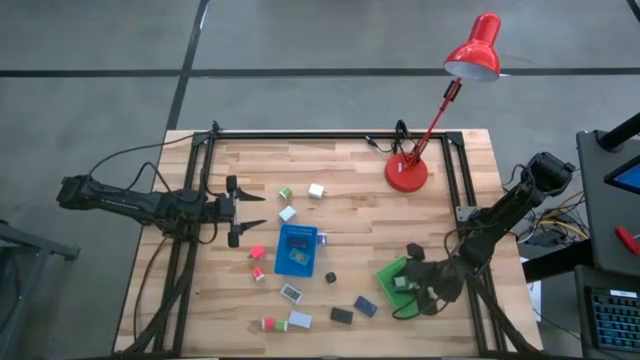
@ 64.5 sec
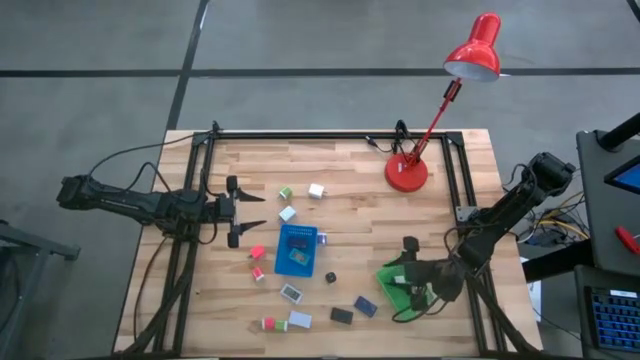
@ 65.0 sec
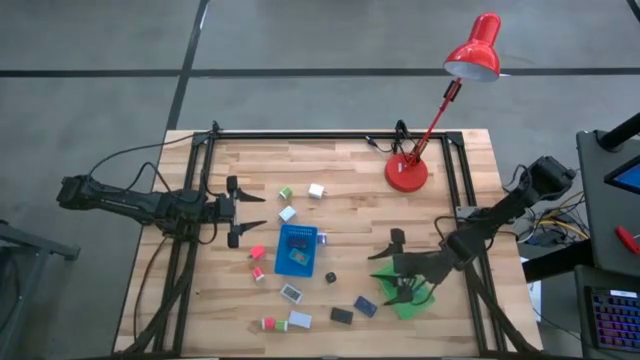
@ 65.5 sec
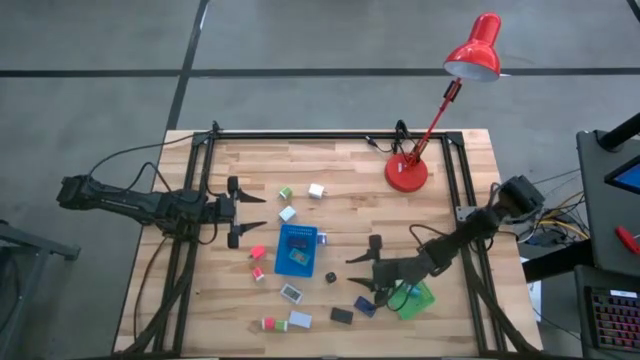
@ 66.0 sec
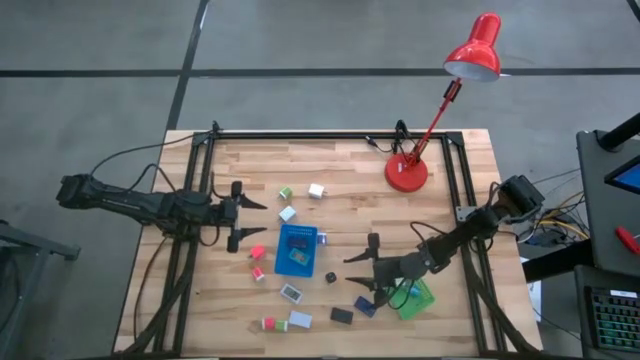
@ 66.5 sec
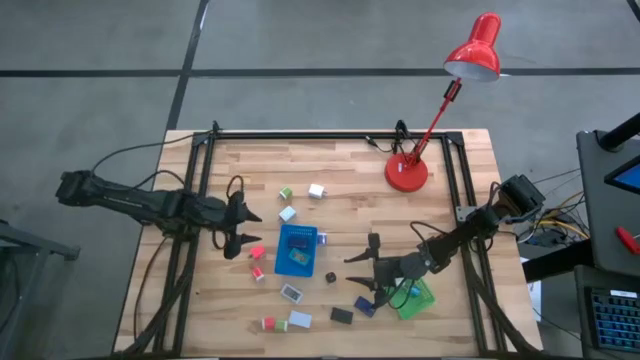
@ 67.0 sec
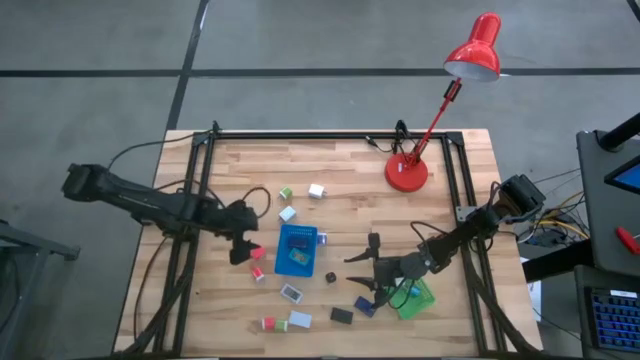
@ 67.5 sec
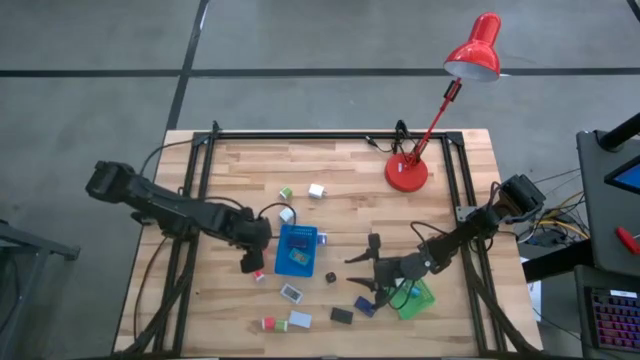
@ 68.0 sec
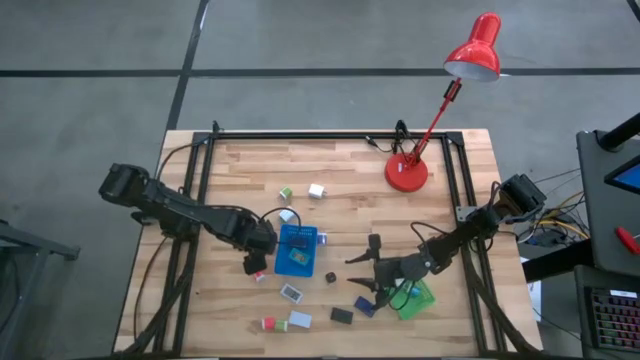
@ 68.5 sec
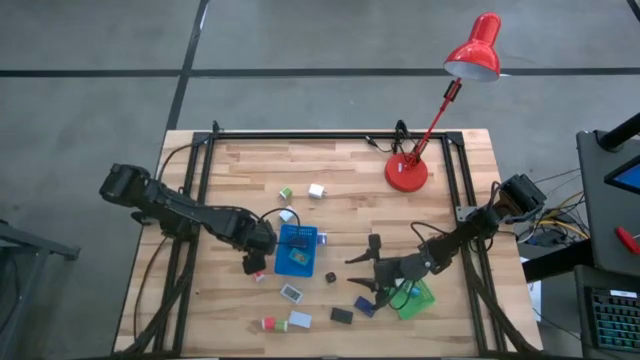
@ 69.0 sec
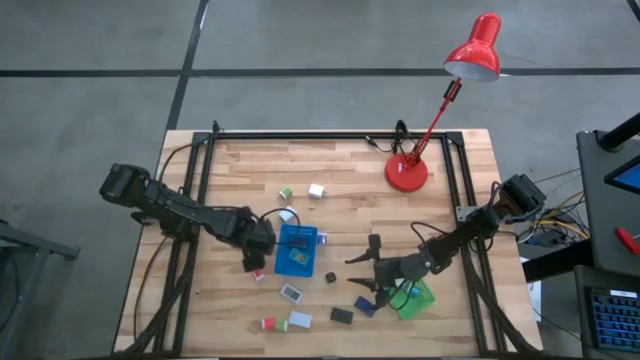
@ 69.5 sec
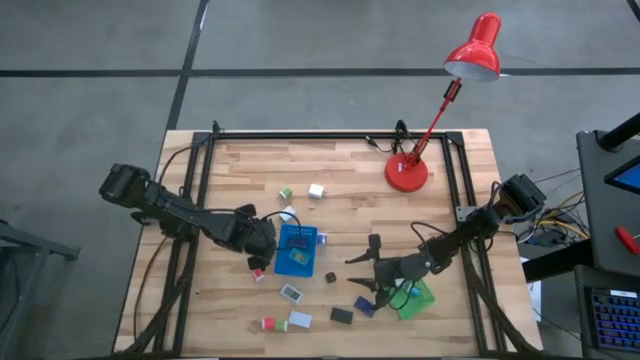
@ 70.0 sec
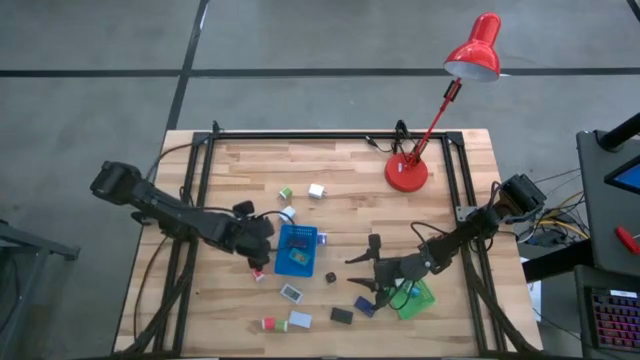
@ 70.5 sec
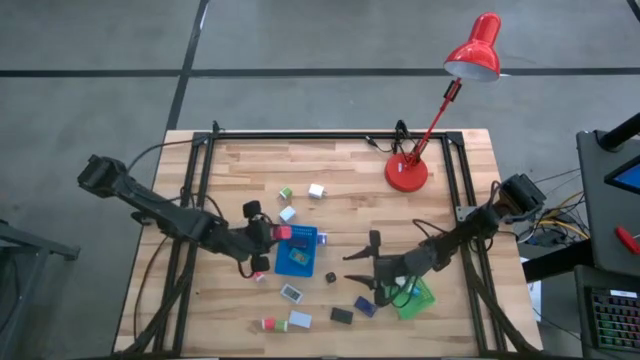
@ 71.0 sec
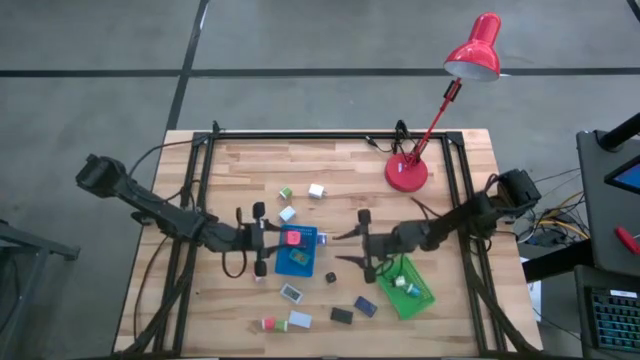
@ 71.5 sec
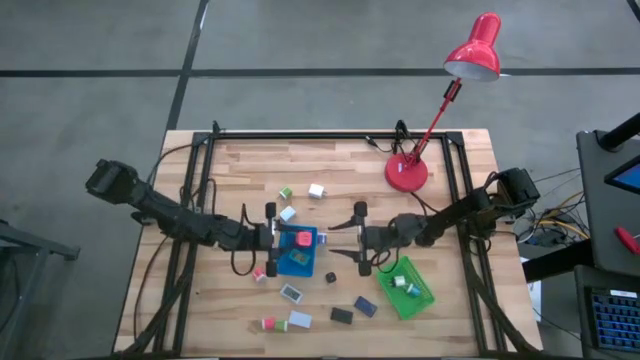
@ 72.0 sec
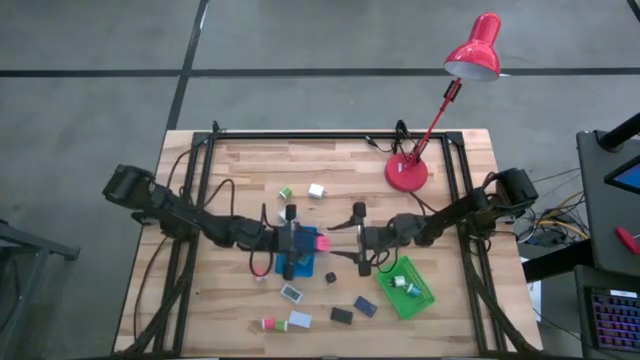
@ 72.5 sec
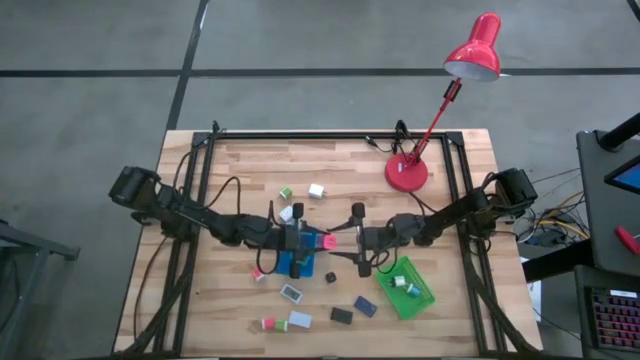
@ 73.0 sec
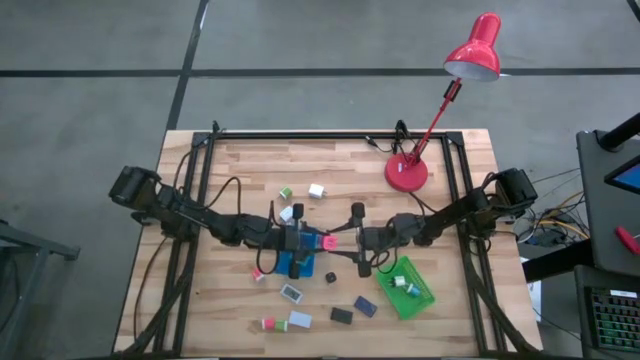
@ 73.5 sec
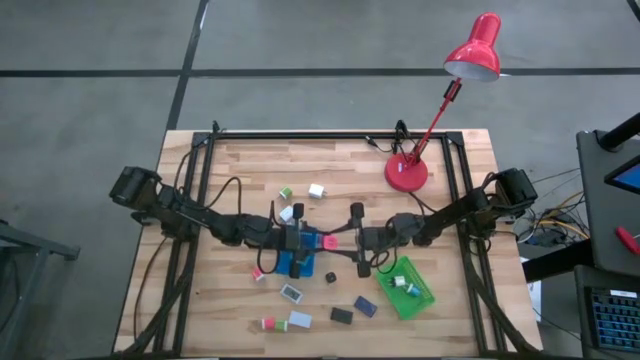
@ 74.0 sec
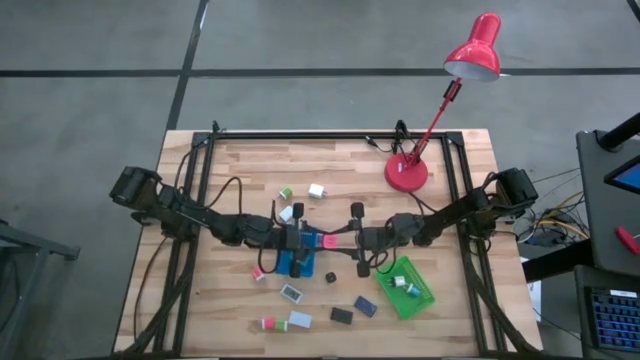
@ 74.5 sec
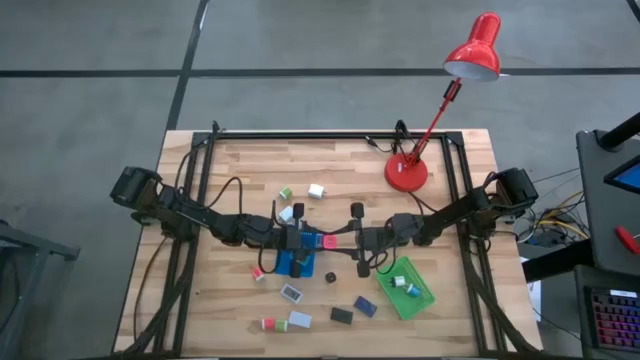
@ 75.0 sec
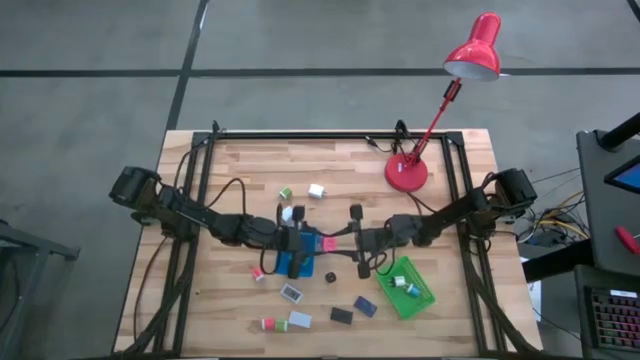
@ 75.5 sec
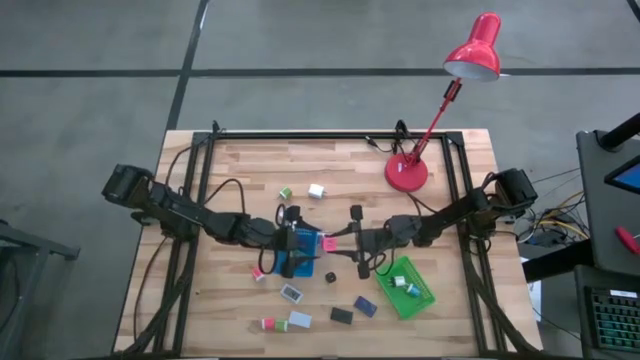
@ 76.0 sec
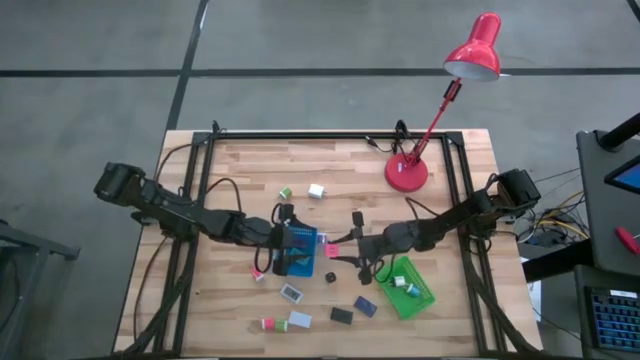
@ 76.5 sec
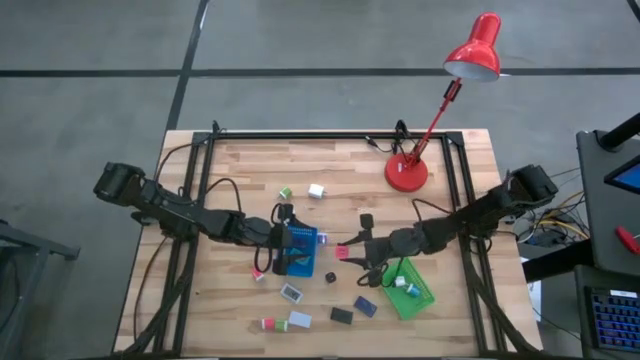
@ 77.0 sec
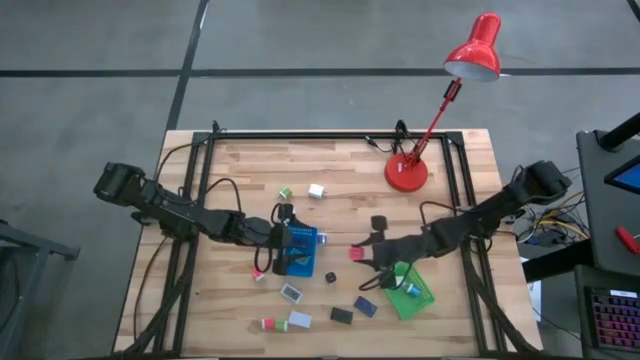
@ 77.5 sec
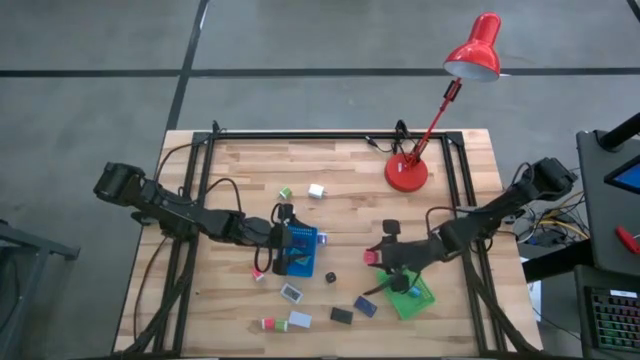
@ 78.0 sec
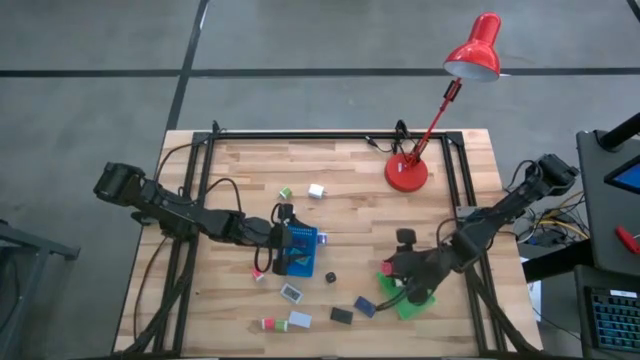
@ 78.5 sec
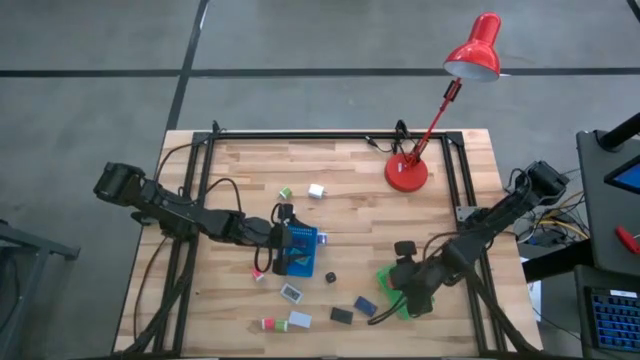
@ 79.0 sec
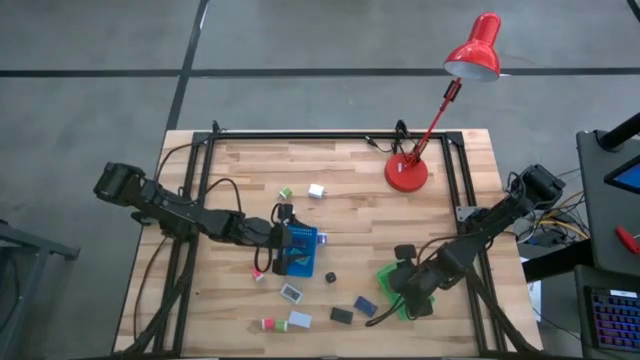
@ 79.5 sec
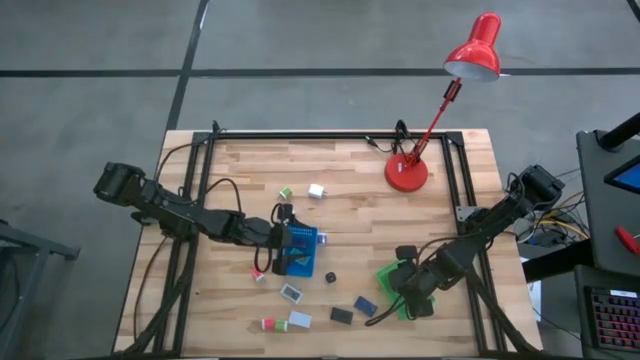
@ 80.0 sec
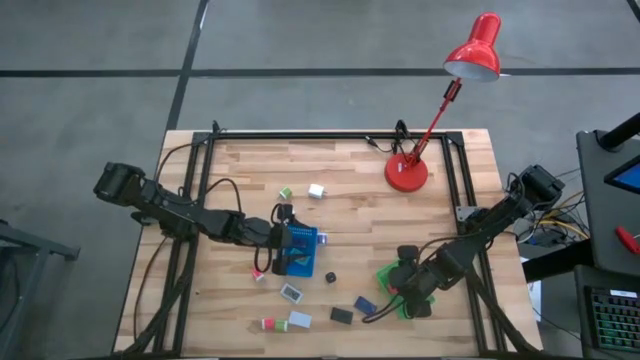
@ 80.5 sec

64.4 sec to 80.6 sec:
Task: Pick & Place Office items
Put the pink charger adapter into the green bin
